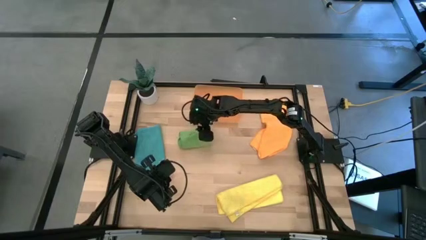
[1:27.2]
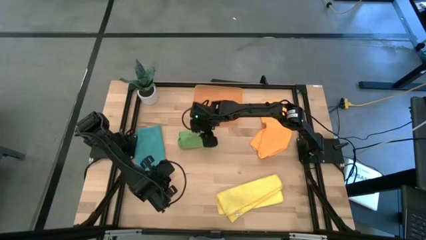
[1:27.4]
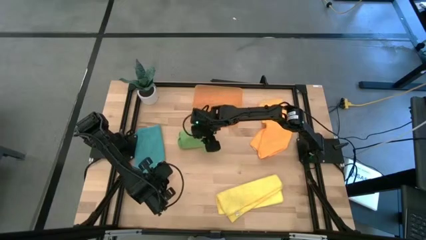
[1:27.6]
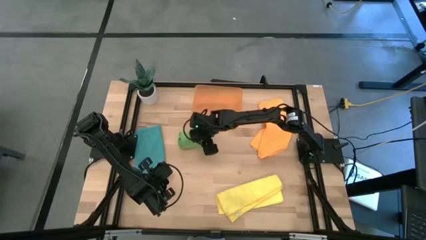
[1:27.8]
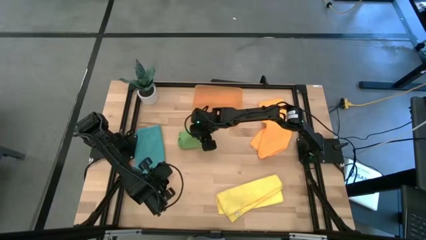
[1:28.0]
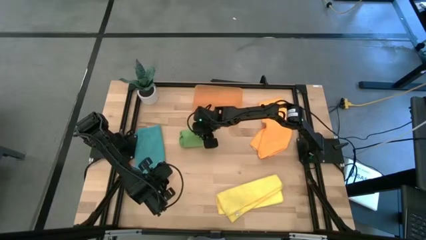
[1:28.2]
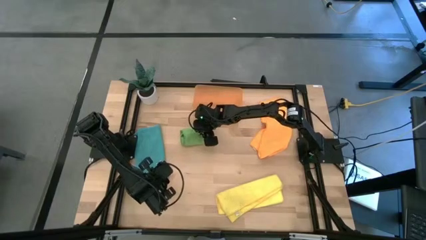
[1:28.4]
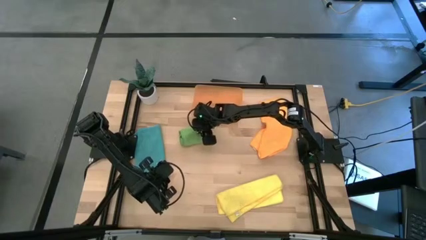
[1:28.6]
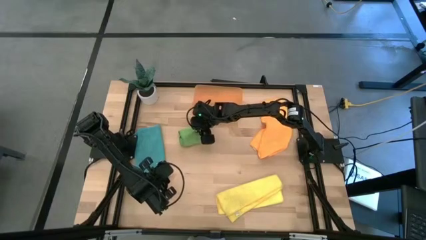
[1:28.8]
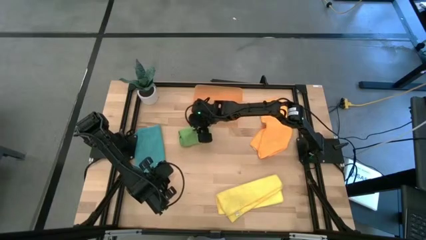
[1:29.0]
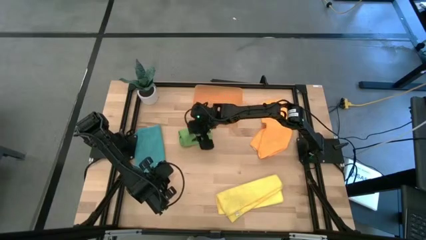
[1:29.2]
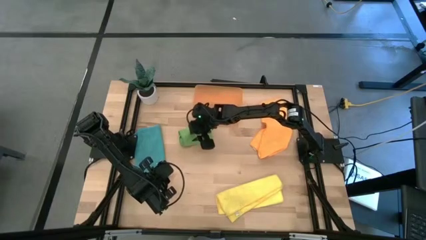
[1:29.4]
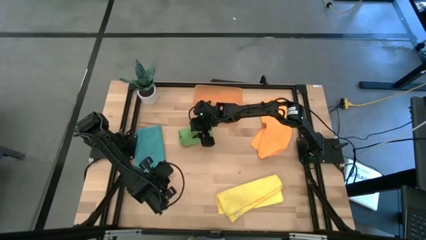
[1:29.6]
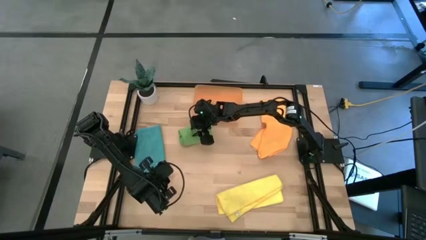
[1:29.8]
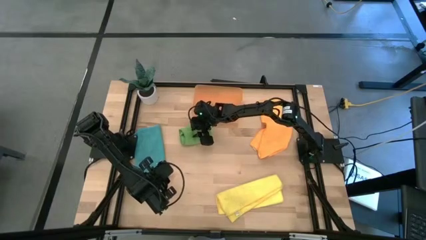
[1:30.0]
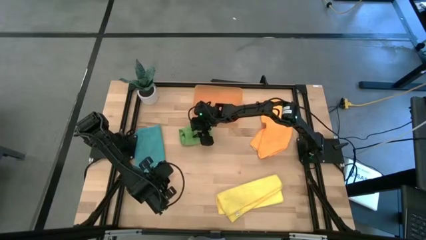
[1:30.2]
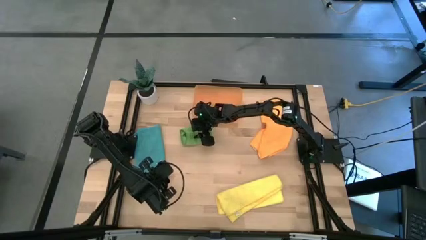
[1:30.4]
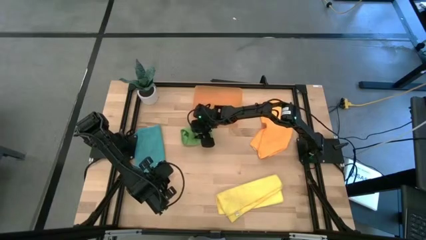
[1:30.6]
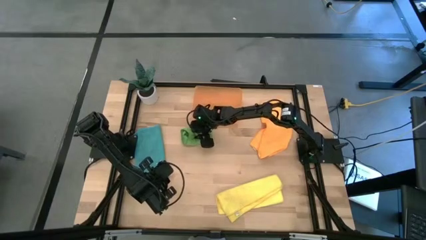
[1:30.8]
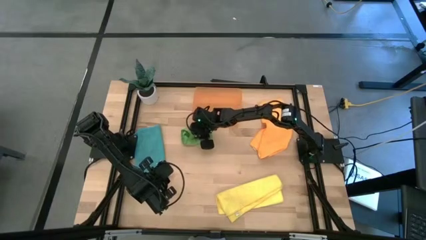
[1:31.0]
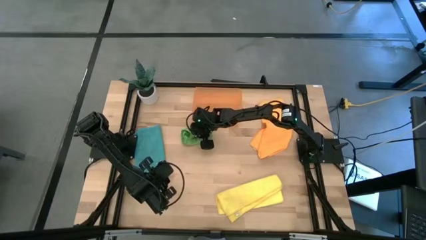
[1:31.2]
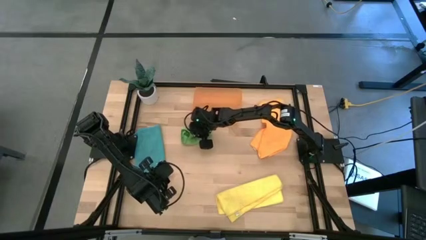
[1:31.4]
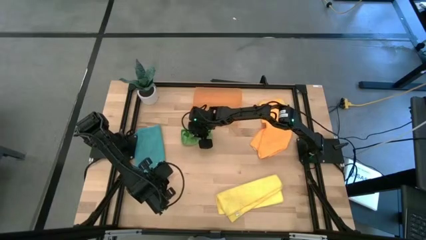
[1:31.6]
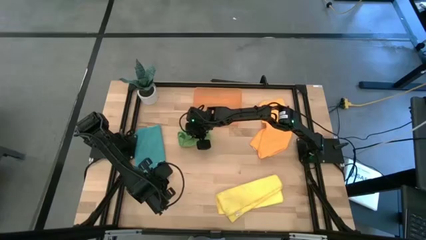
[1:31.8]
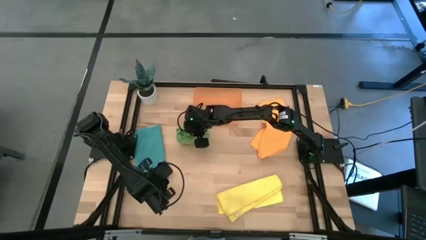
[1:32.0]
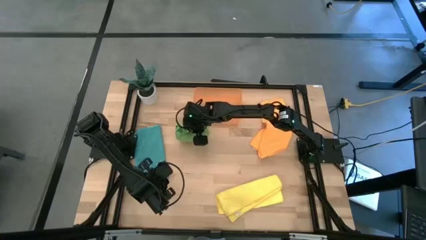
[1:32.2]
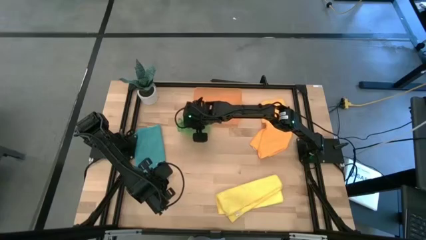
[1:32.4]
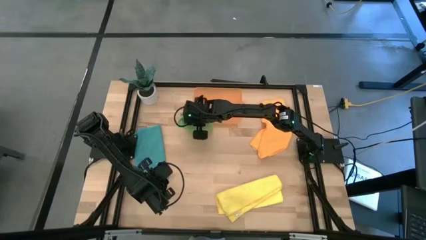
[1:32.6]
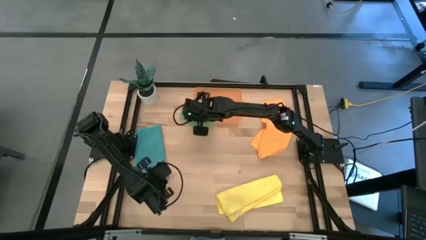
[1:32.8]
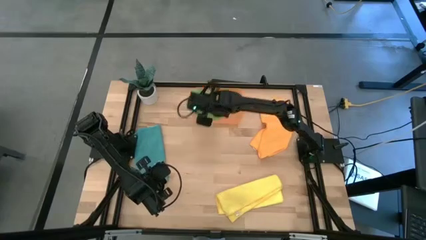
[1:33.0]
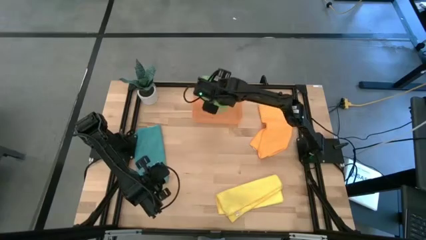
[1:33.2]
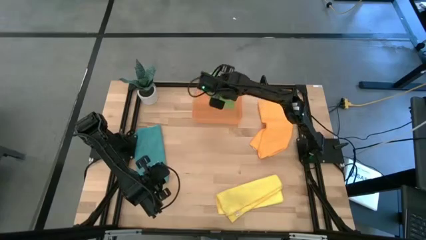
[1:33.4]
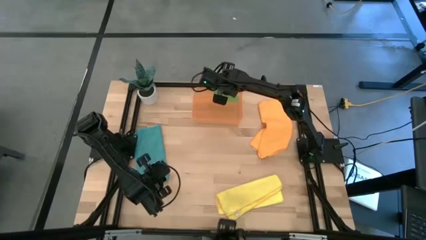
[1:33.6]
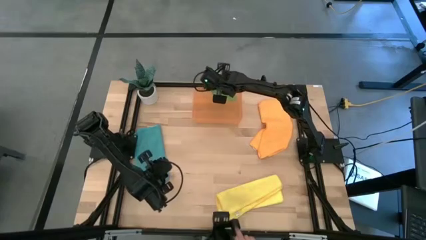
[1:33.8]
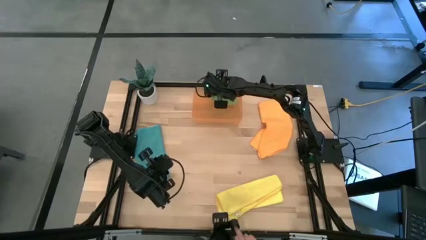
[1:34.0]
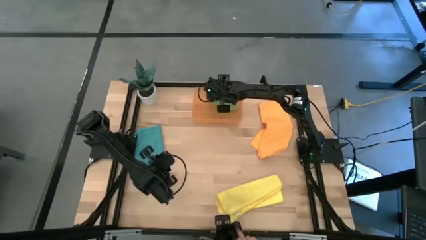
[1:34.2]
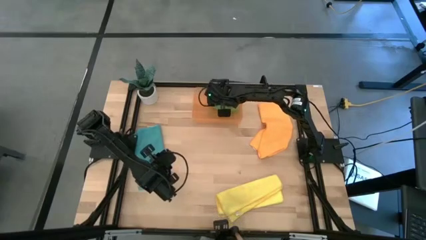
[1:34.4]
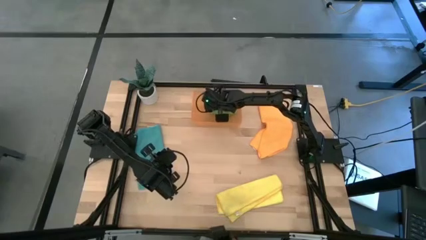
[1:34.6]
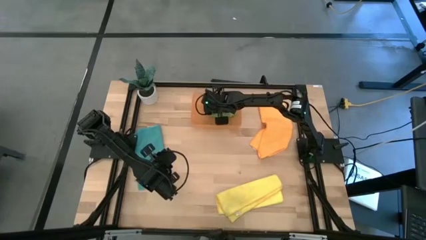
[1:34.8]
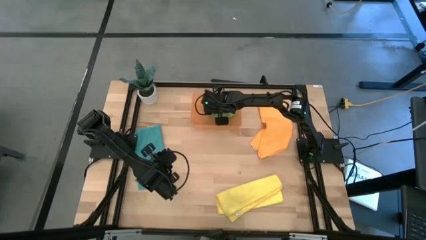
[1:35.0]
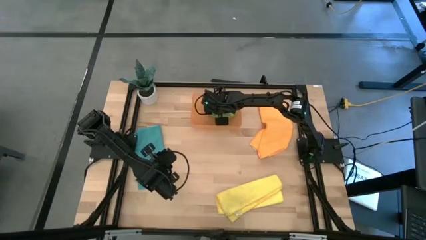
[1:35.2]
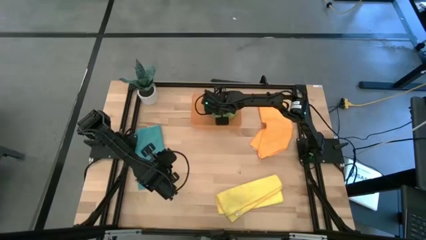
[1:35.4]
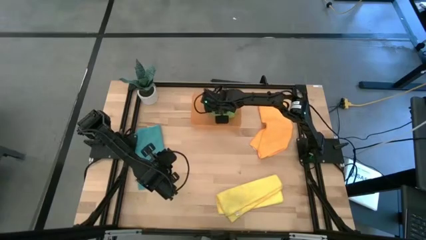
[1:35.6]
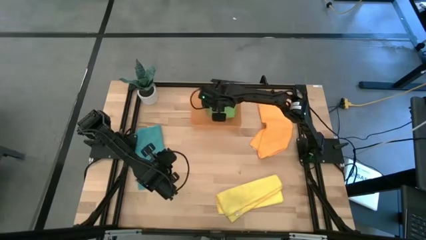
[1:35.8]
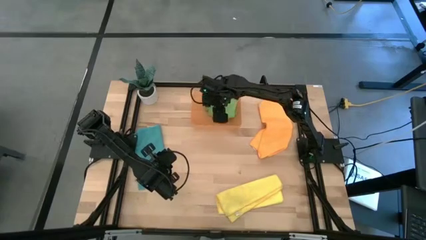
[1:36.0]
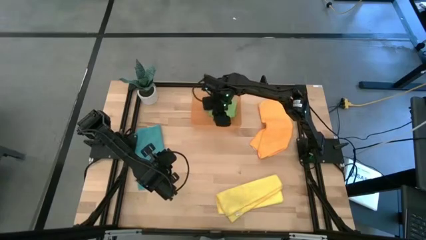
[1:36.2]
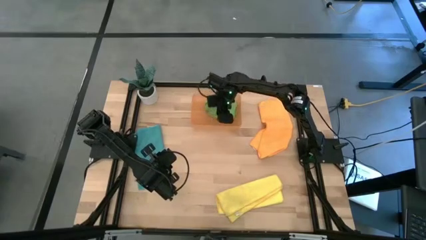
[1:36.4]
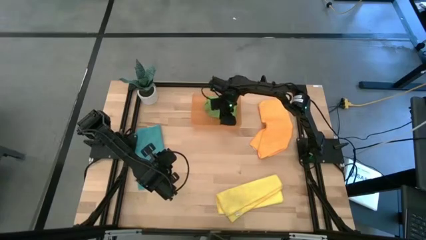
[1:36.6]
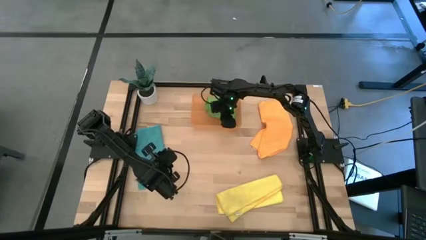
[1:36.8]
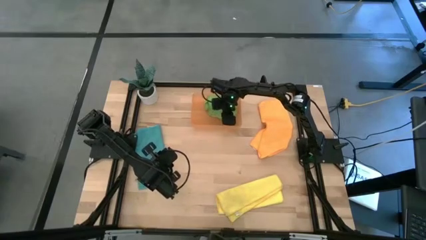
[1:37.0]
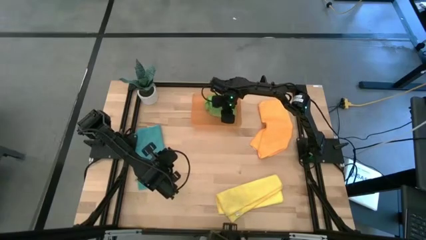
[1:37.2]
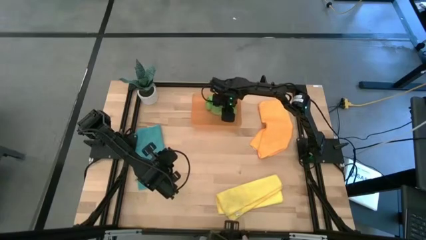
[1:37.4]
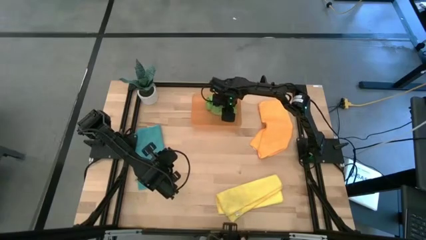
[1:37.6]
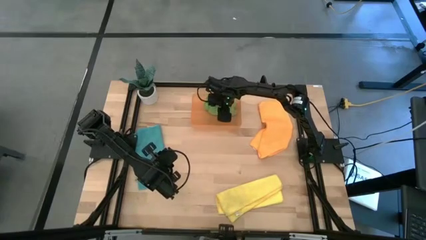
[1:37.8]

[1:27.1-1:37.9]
Task: Roll microfiber towels into tight, uniform cylinder then place into a basket
Put the rolled green microfiber cloth into the orange bin

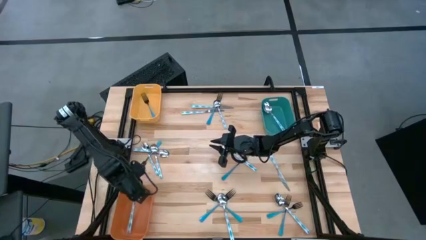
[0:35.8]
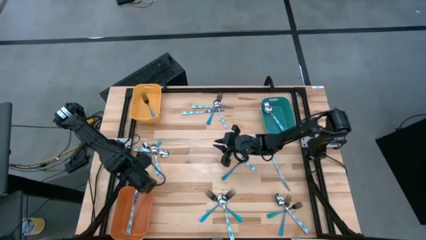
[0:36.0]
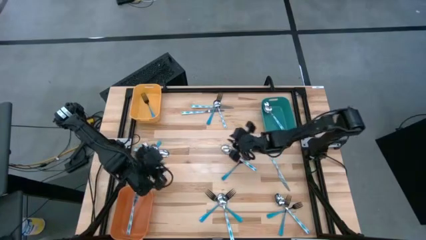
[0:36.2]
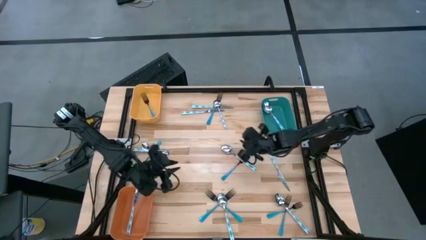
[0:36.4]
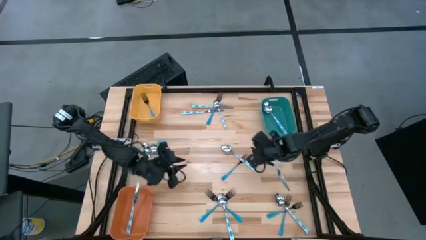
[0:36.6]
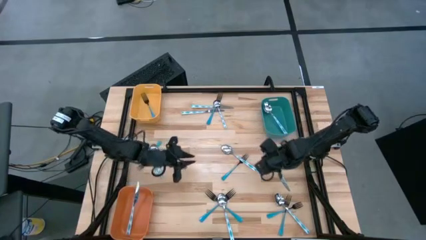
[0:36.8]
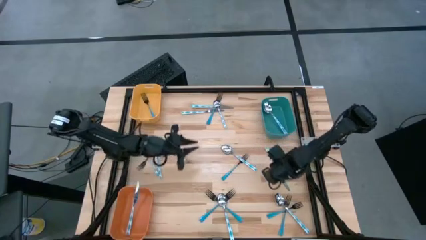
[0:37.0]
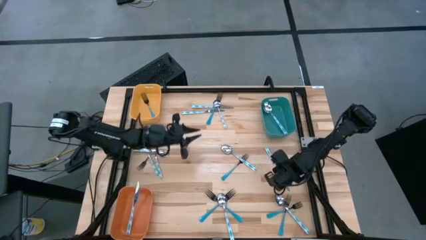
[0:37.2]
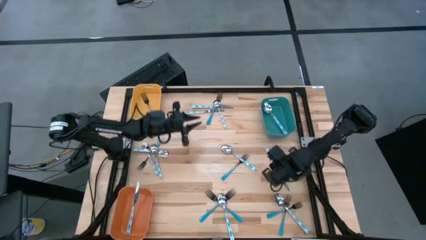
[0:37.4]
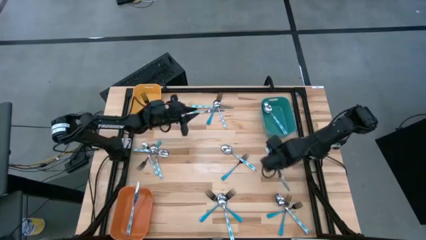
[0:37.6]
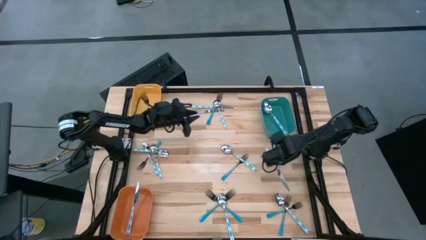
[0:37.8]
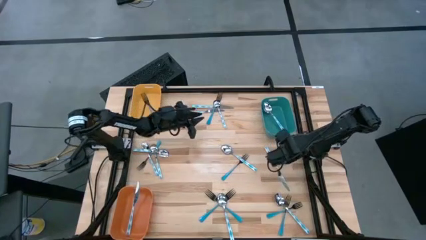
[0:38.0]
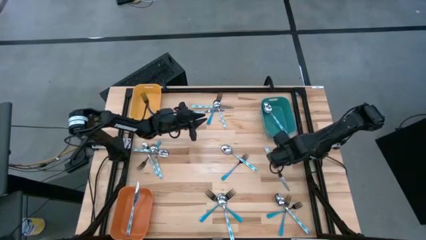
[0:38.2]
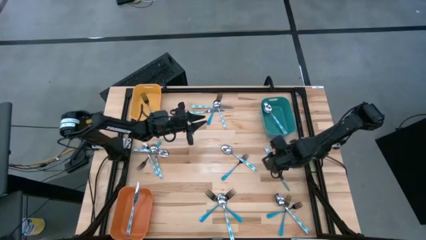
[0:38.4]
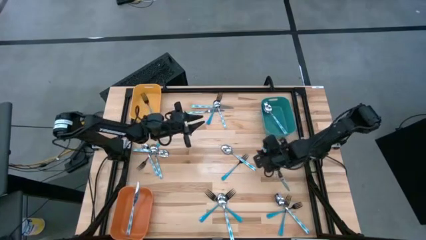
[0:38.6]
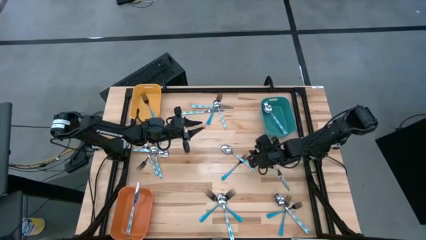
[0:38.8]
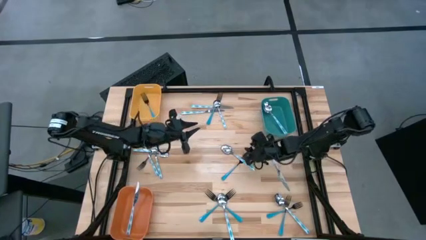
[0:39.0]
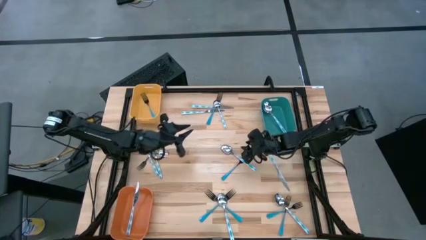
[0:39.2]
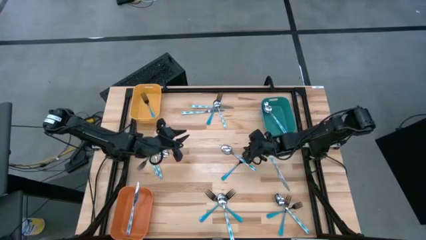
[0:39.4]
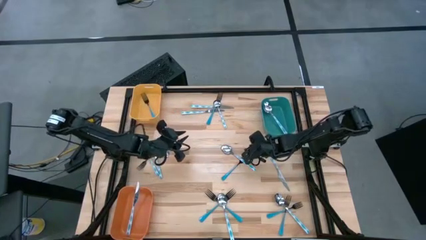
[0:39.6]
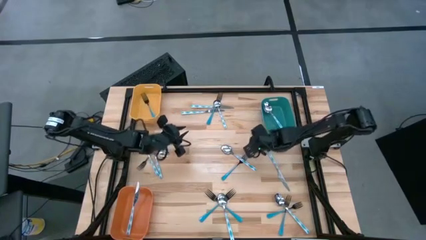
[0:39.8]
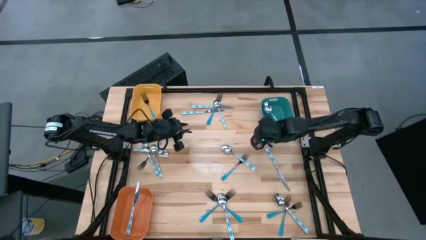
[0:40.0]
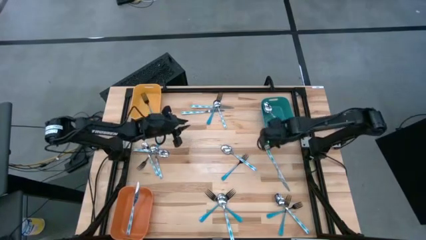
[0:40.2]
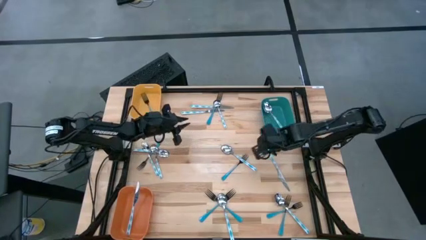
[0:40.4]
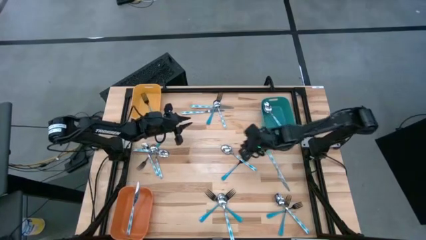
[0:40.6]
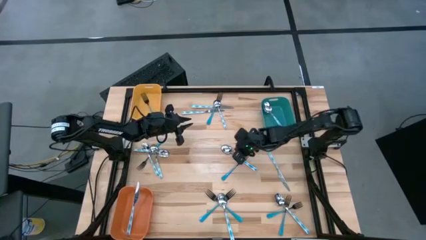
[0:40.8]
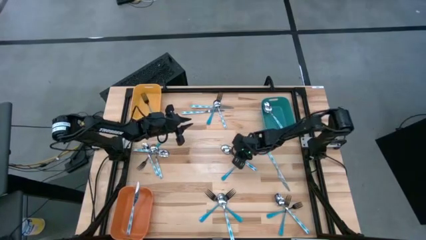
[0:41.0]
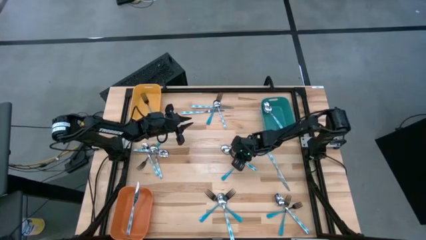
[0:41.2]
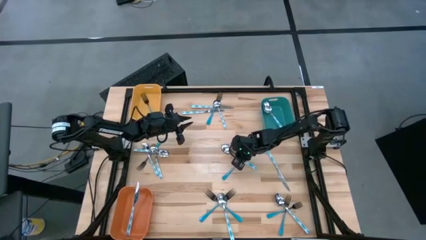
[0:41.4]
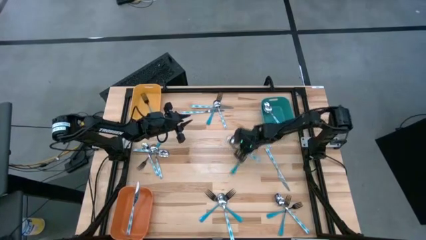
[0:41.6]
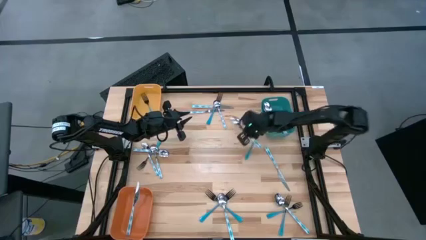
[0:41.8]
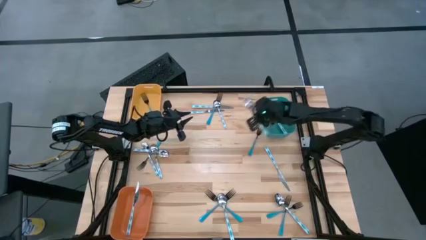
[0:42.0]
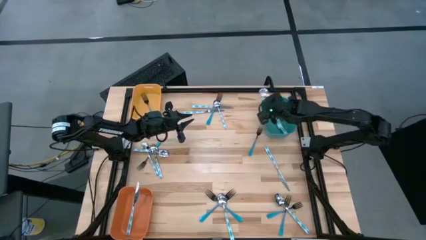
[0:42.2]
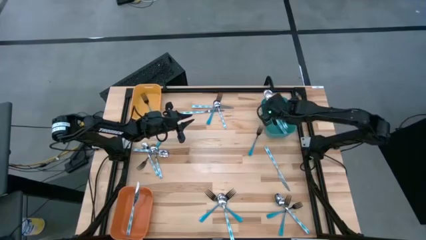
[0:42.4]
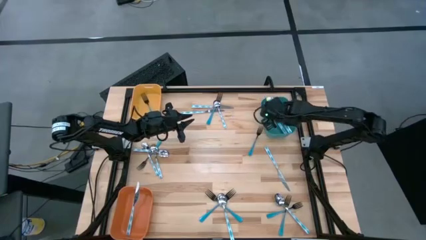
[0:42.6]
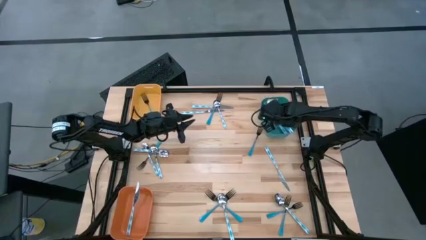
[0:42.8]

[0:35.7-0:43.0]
Task: Sort silverware by color (type)
Put the white-blue spoon into the blue bin
